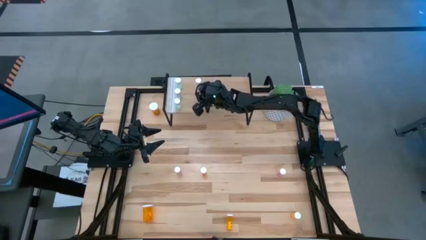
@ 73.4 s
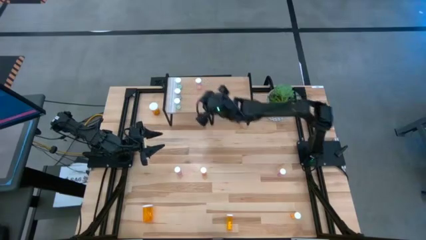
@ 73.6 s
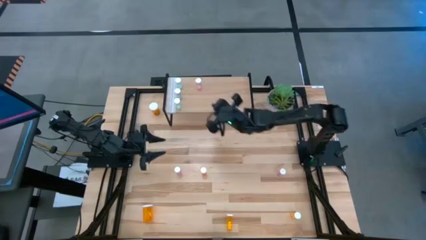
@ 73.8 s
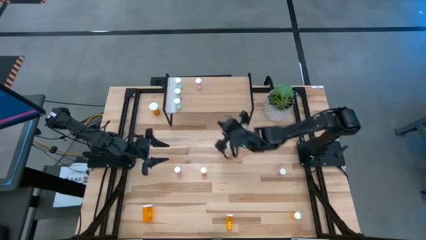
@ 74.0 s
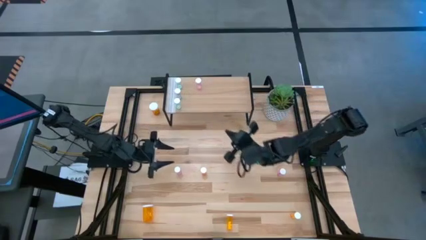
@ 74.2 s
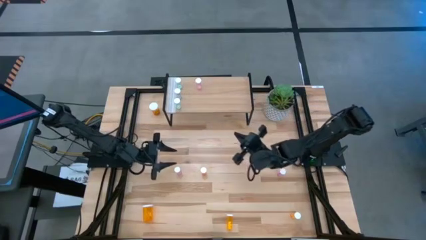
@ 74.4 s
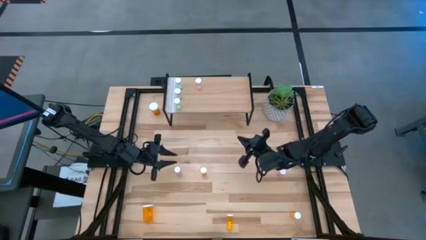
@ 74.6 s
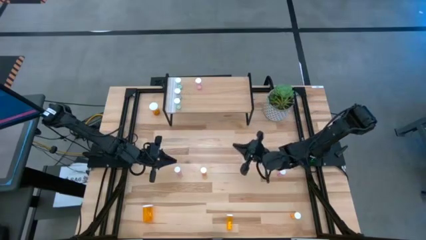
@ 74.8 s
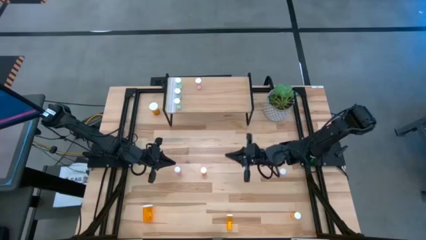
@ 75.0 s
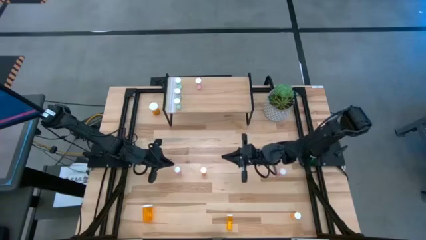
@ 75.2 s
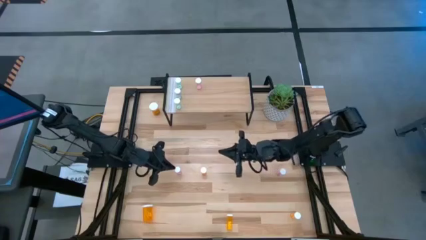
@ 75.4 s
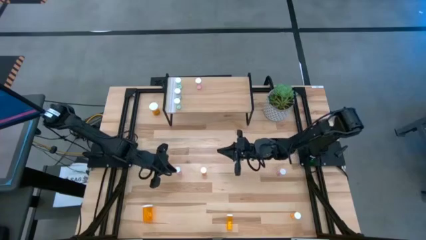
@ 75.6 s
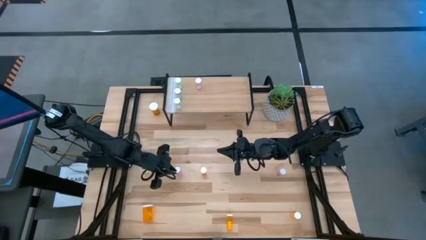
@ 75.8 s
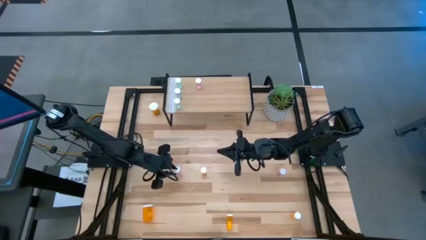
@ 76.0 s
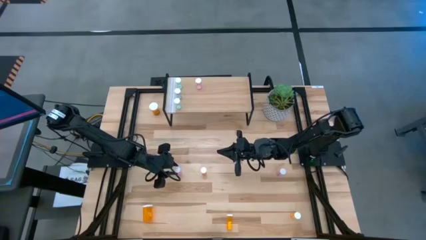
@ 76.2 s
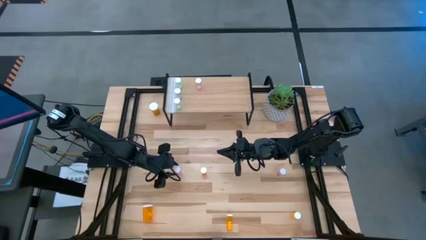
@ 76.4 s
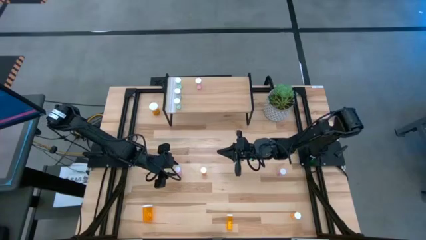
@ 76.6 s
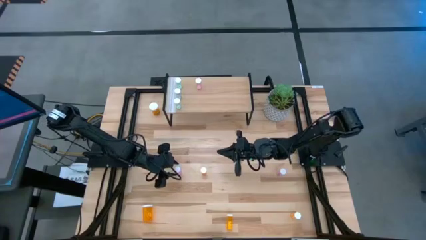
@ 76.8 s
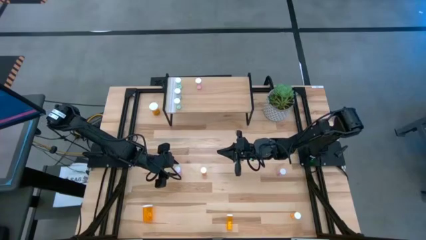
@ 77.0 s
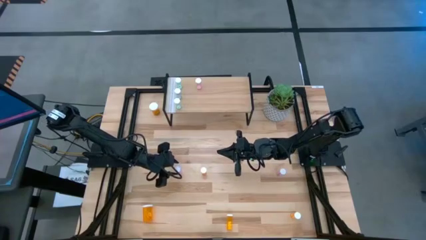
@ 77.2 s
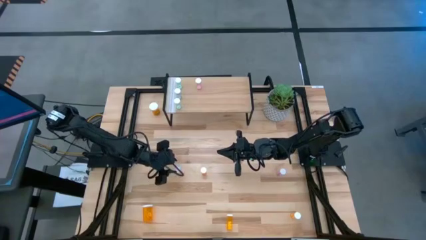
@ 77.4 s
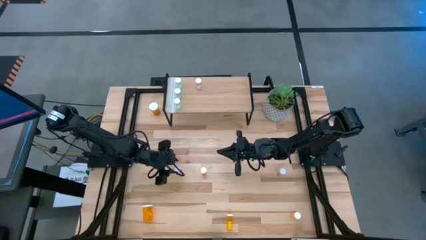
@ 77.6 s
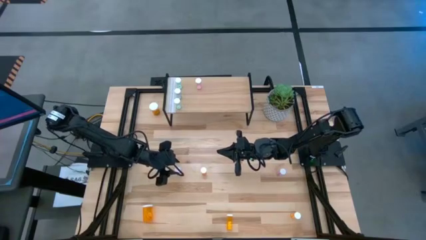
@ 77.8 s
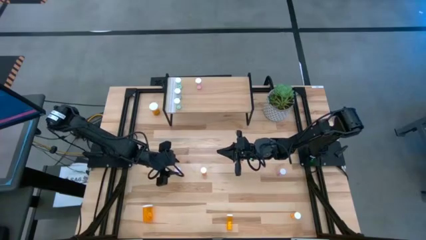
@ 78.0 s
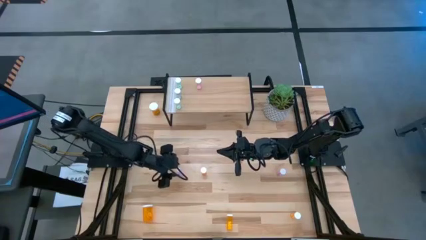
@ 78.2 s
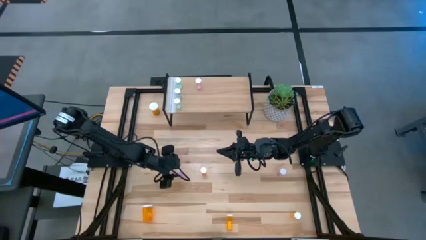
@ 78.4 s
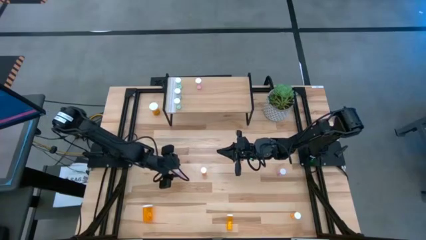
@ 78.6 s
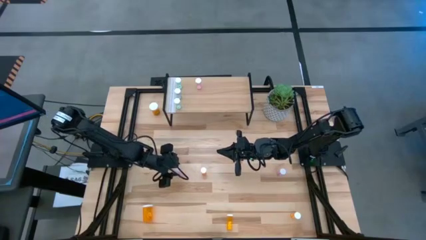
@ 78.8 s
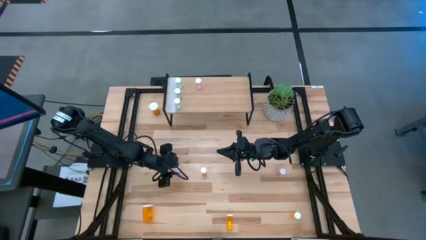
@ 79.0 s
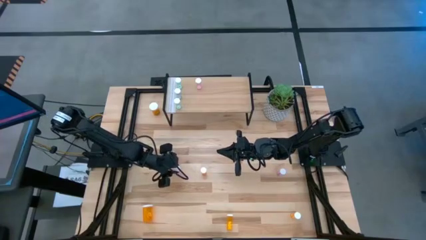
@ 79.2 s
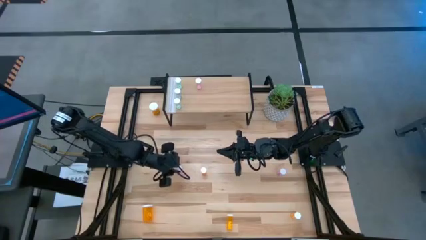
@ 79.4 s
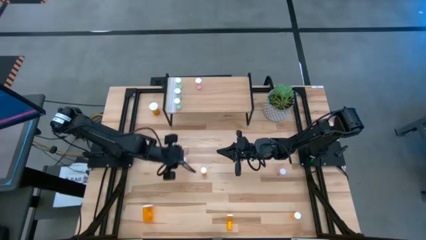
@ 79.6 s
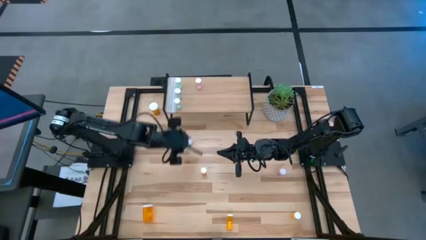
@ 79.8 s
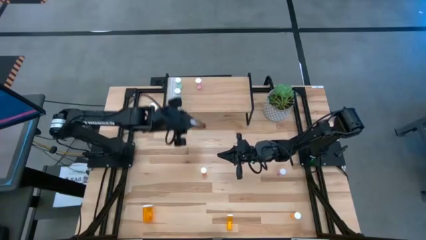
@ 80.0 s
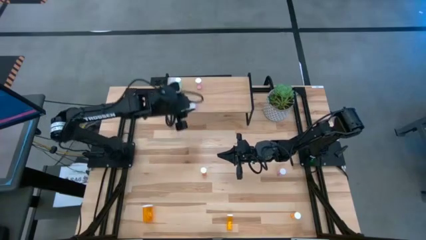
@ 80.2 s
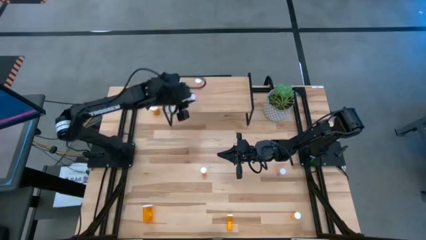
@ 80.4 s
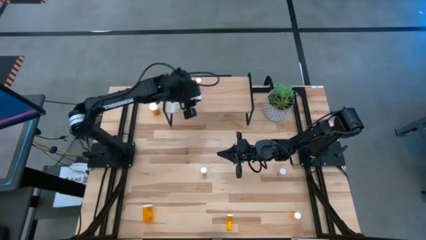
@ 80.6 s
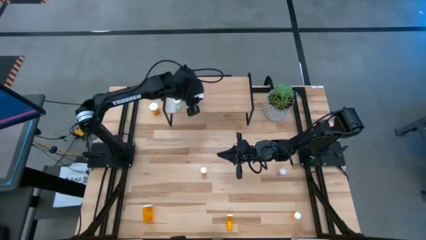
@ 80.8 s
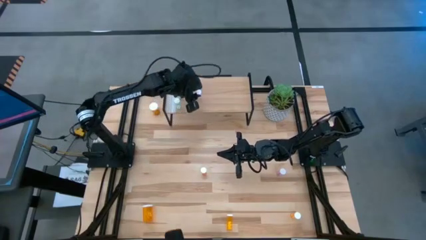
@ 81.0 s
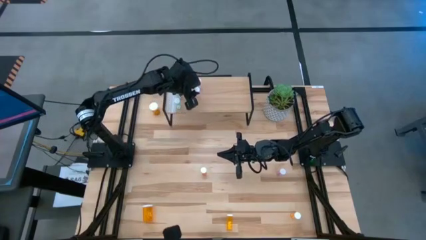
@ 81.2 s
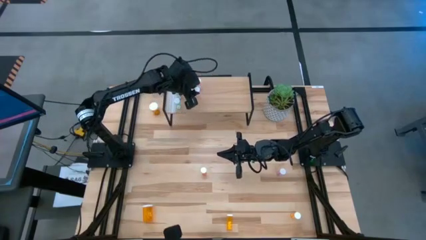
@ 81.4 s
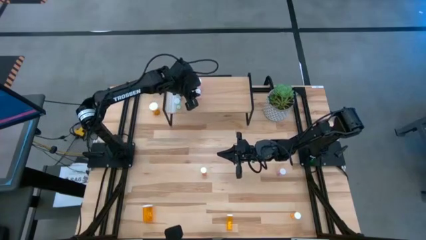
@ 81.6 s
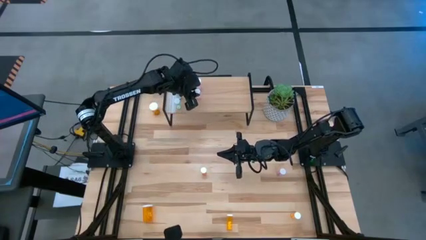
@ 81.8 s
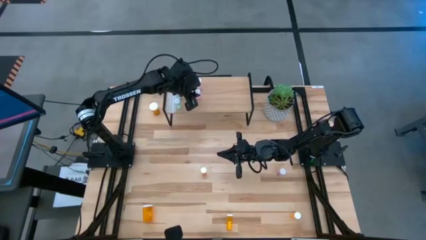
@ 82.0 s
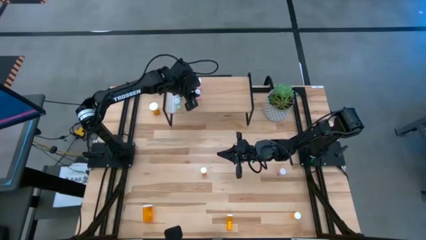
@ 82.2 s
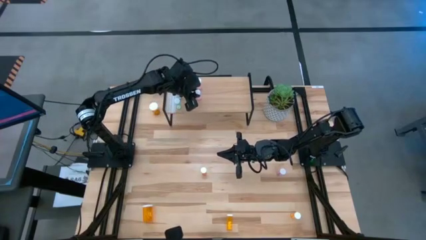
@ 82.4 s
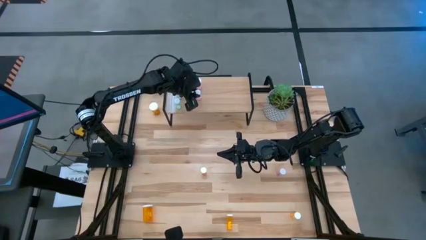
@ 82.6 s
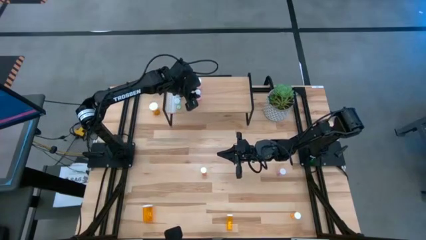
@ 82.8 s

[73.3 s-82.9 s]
Task: Pick and place medicine bottles onto shelf by color
Put the left pink pill bottle on the shelf aligned with the other pink pill bottle
